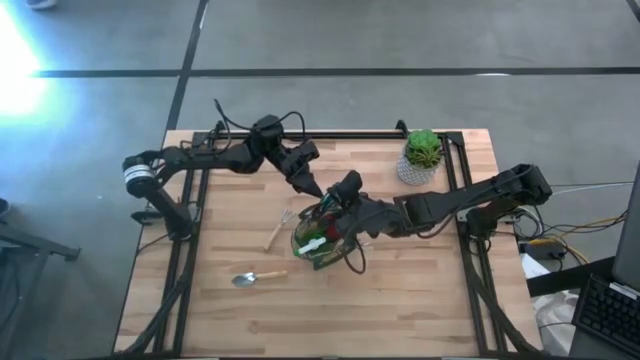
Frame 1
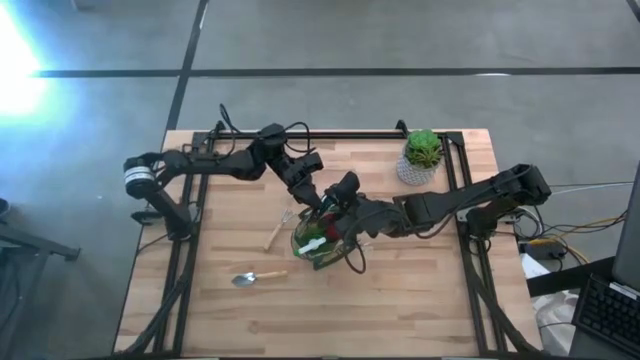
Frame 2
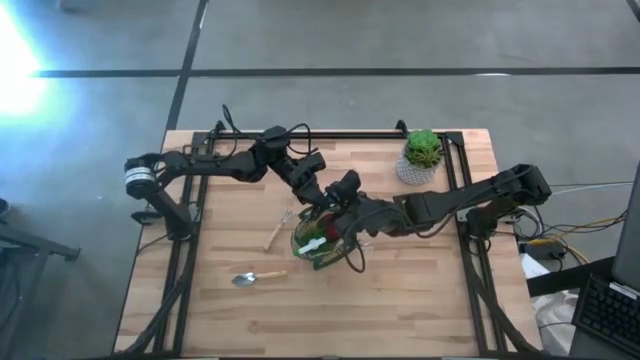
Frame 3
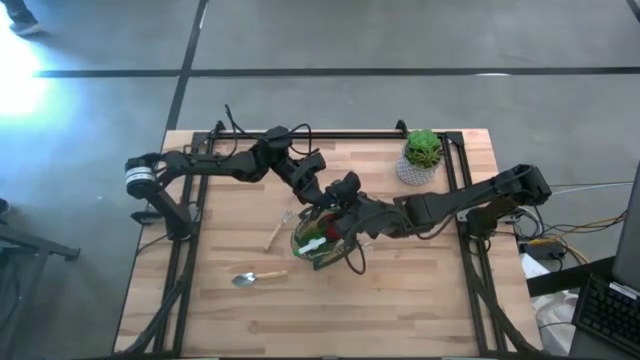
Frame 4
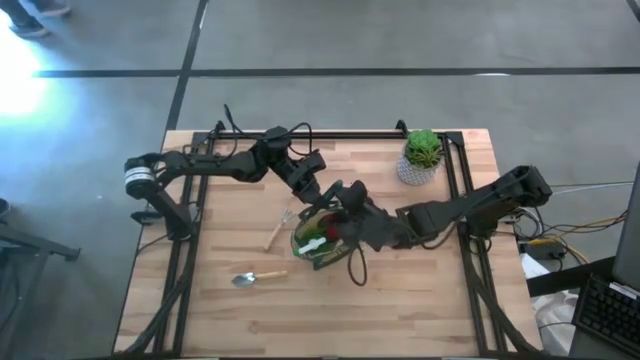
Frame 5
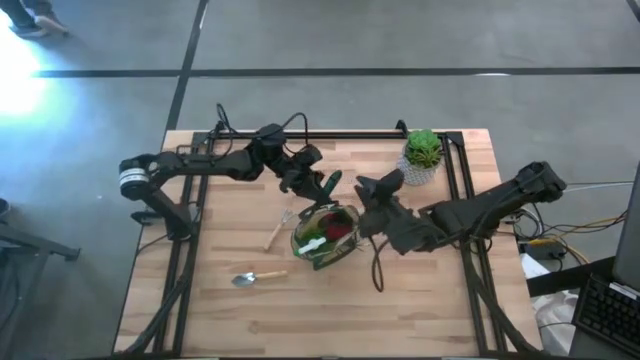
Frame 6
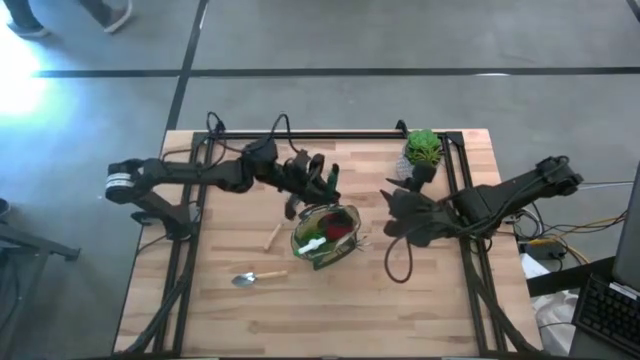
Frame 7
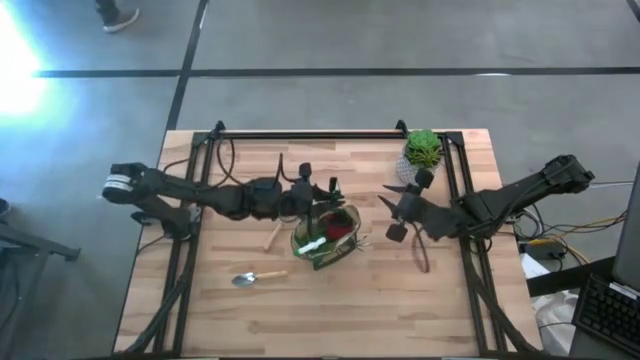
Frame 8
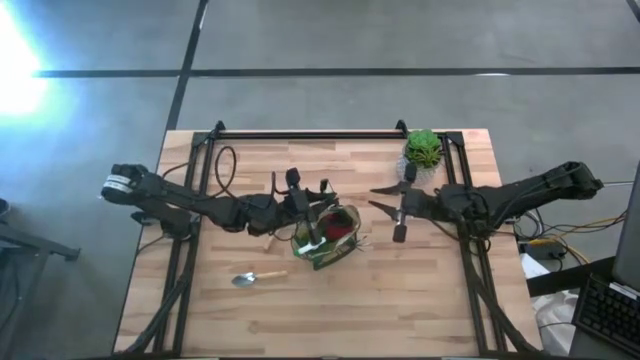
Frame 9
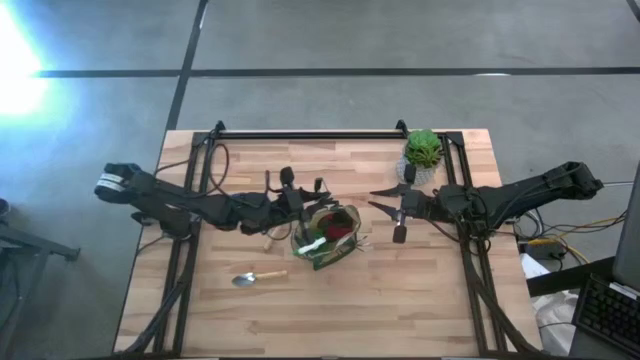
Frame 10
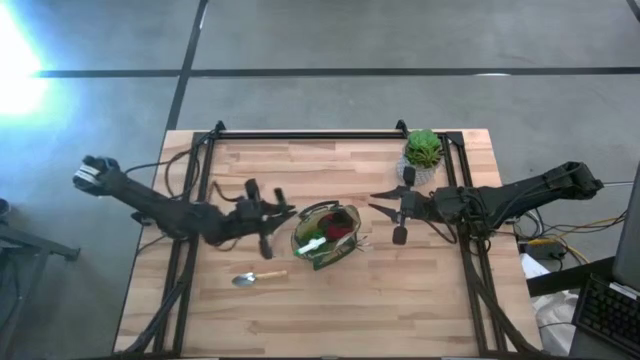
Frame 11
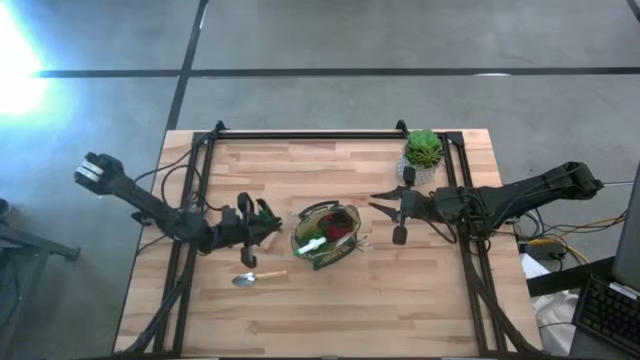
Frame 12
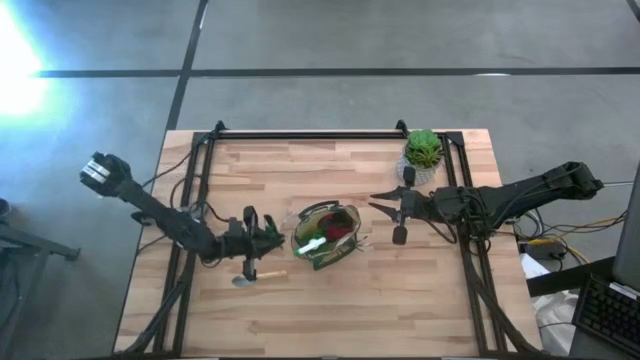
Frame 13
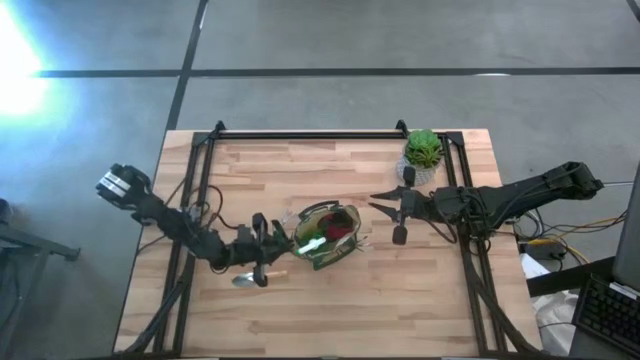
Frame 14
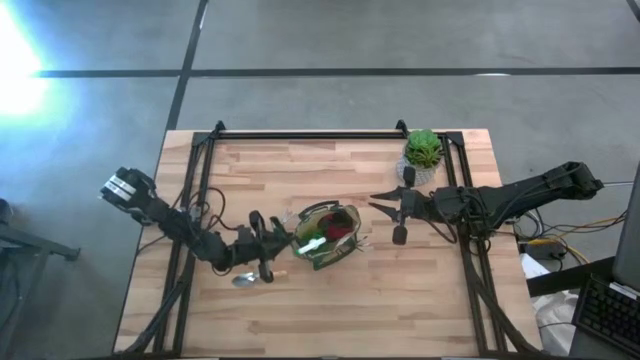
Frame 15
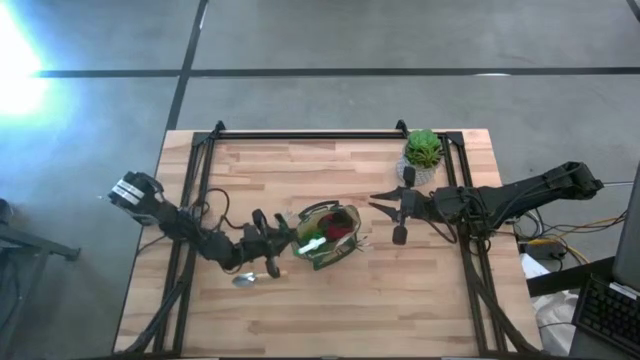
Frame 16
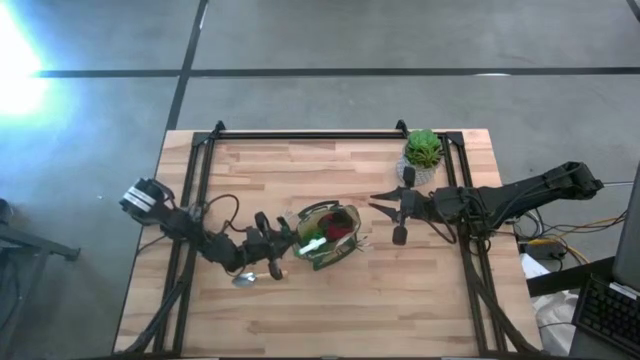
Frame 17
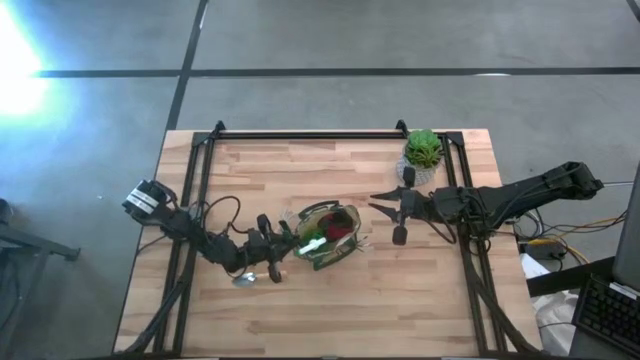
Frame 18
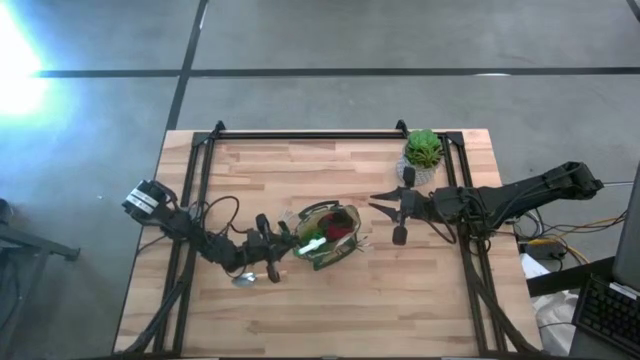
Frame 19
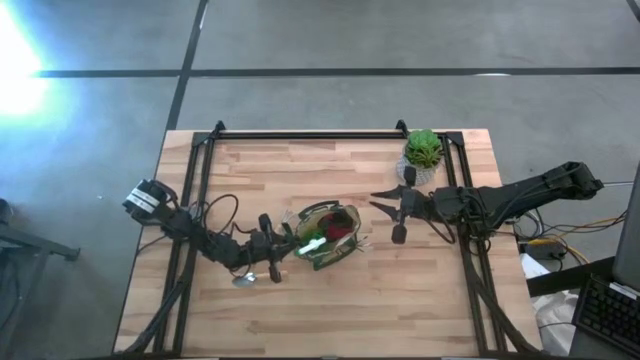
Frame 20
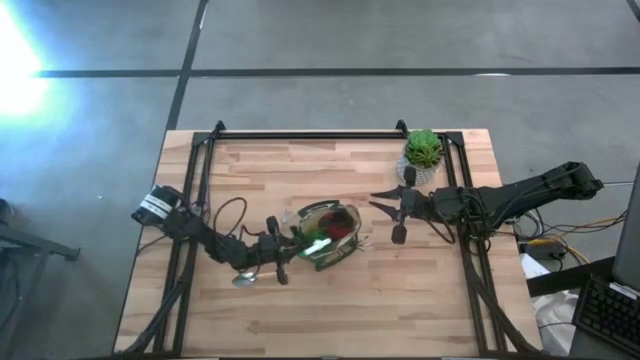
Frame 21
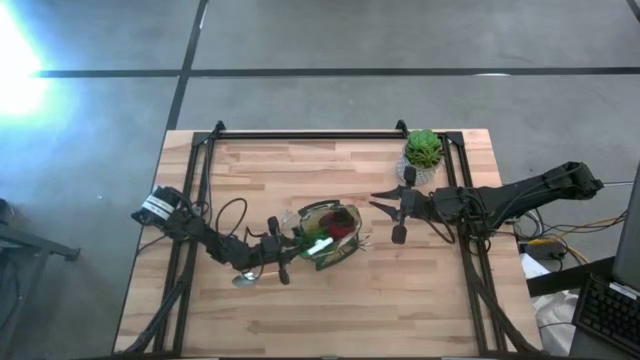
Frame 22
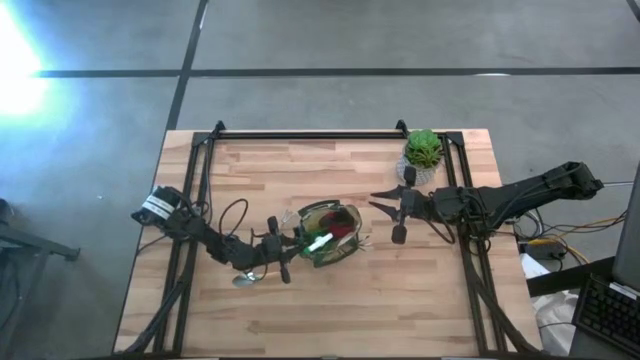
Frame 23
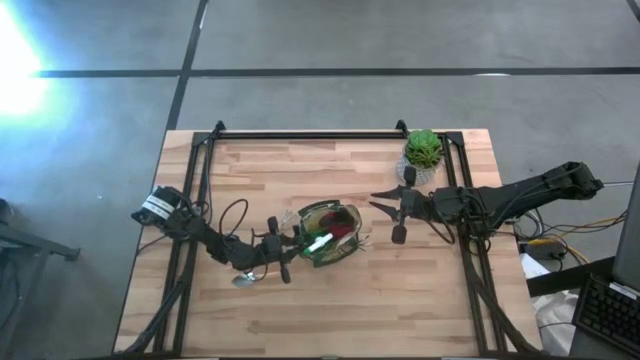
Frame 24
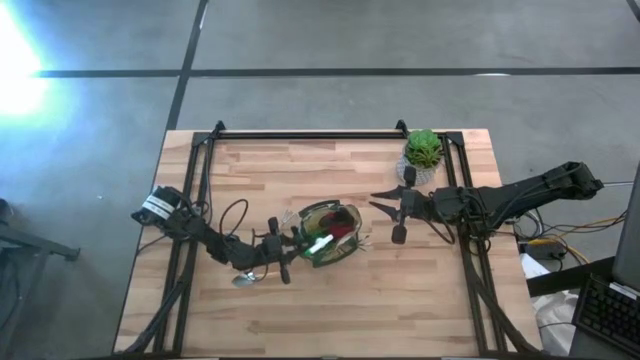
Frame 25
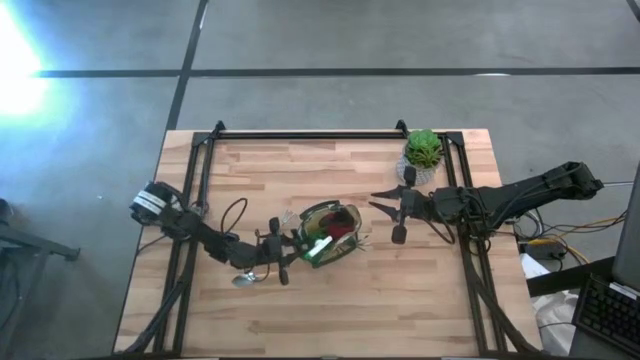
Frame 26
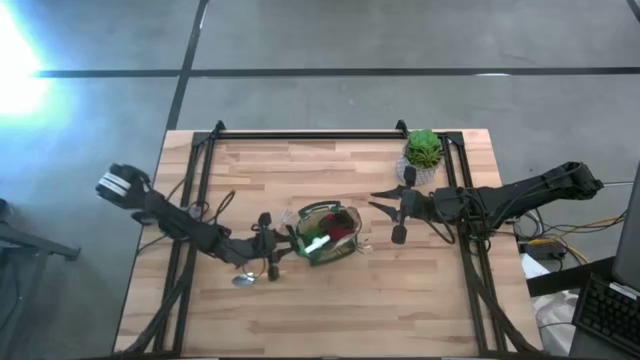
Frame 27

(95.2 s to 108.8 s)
Task: Pick & Place Garden tools in Gardening bag
Put the green shears into the green gardening bag

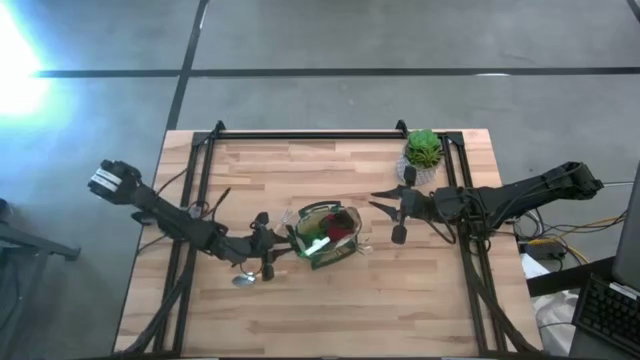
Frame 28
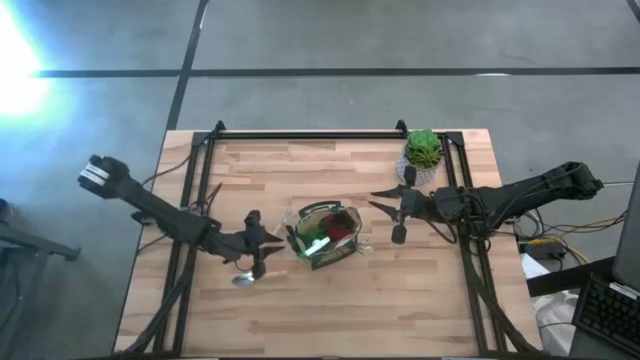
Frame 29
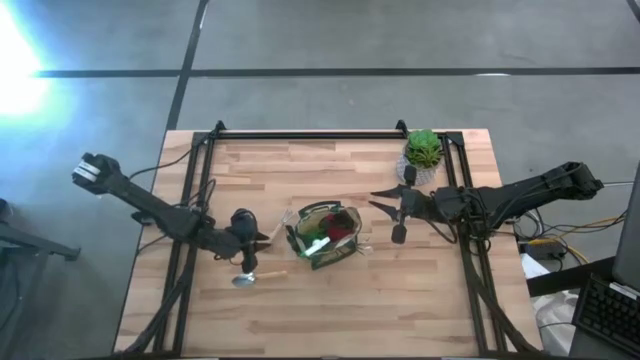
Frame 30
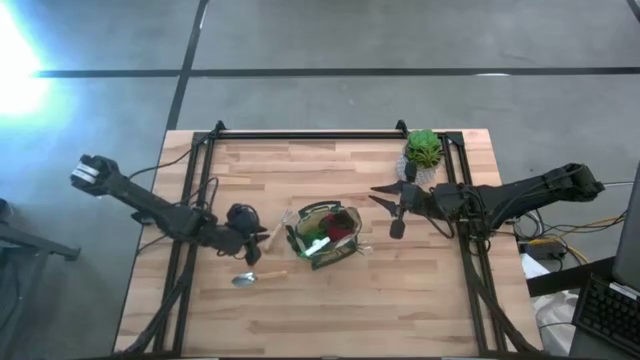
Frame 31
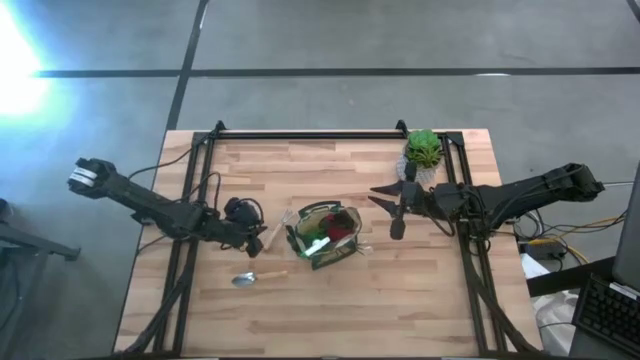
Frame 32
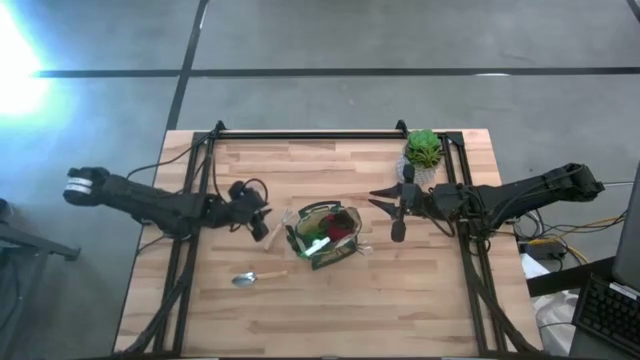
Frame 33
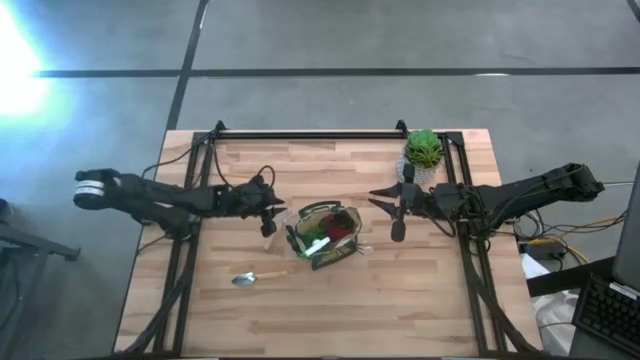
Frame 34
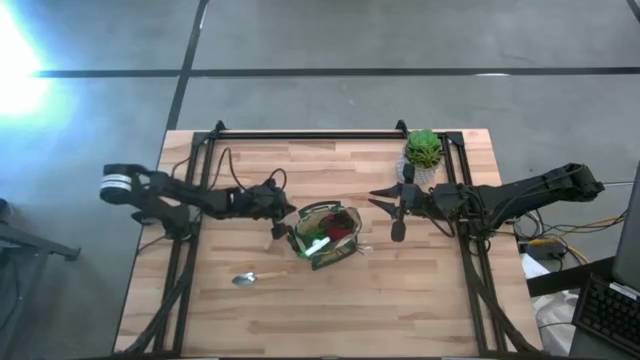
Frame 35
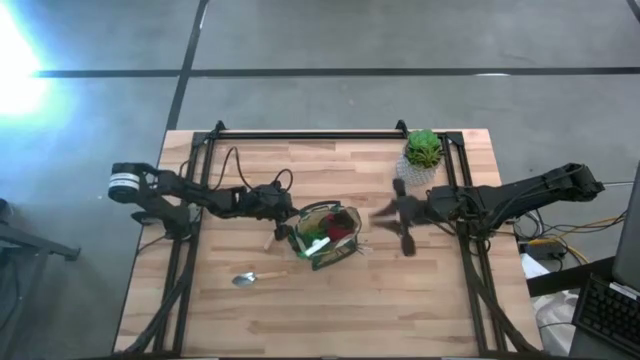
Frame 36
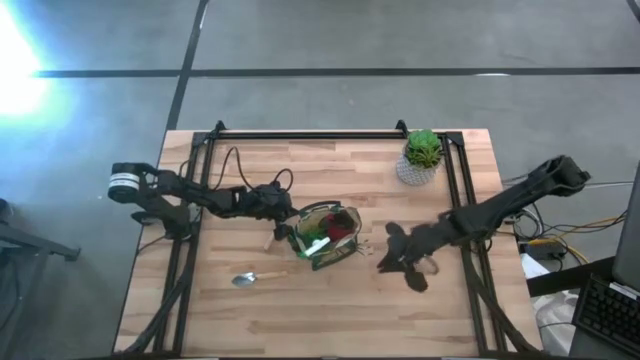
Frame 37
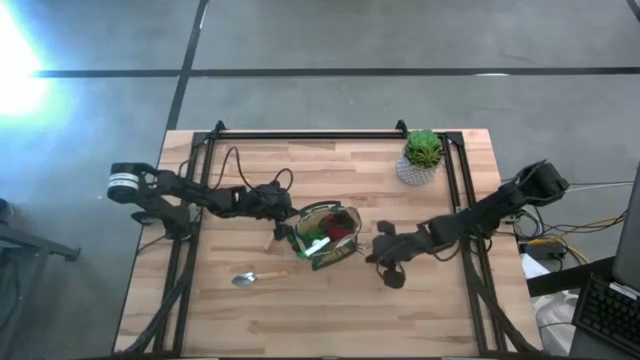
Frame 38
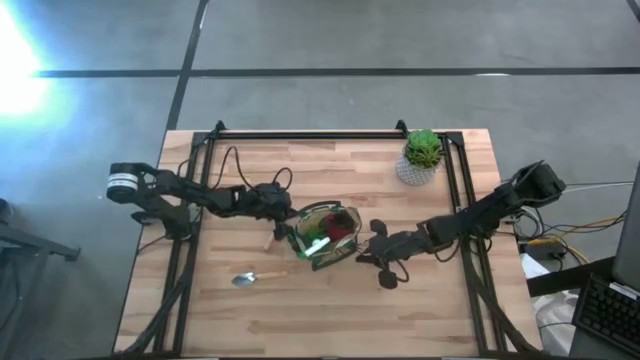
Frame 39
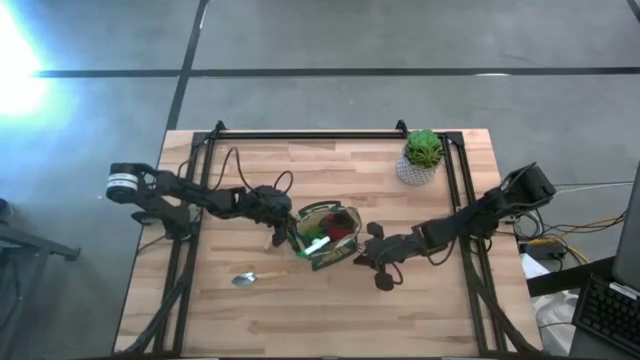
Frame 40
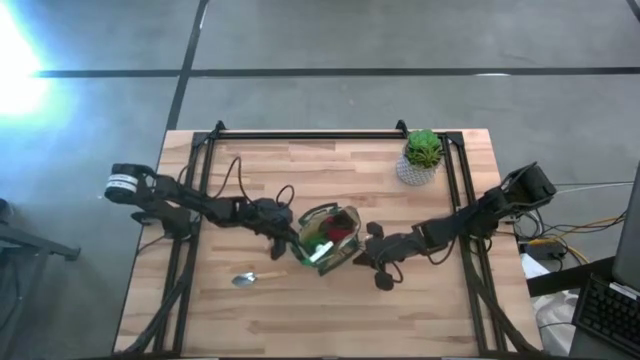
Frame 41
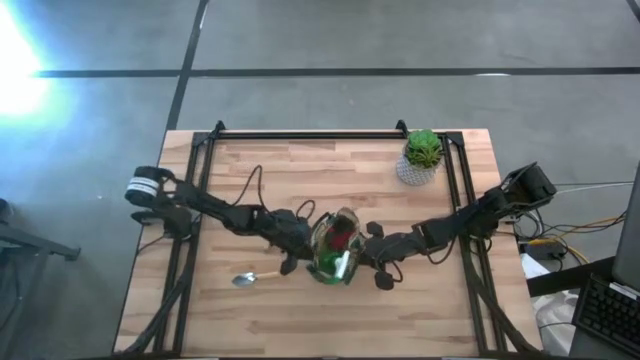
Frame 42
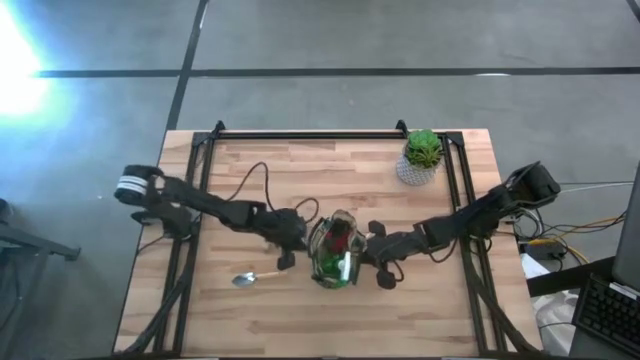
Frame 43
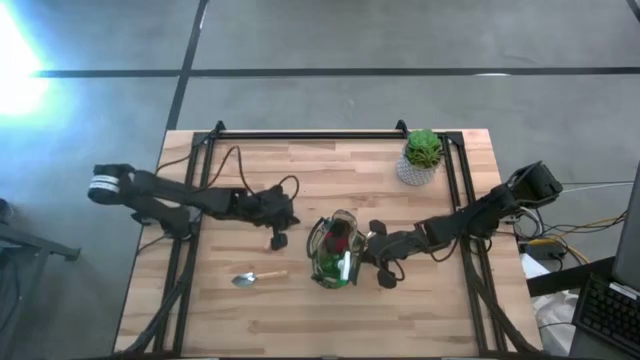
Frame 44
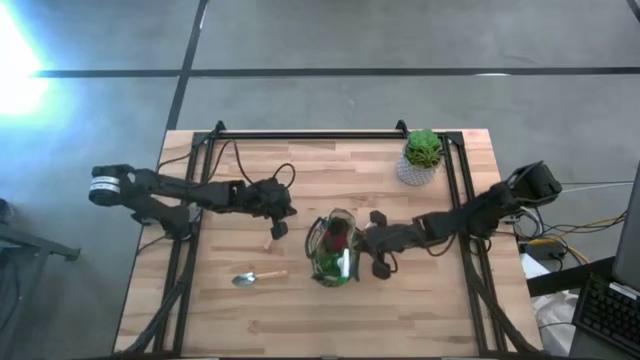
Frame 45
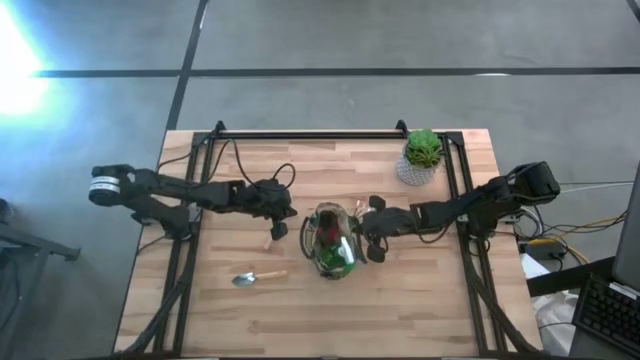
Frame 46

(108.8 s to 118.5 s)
Adjust the green gardening bag
